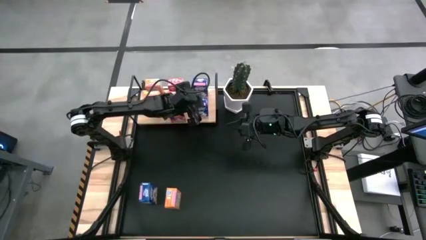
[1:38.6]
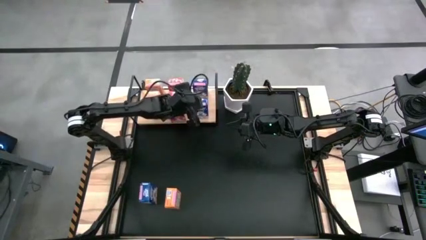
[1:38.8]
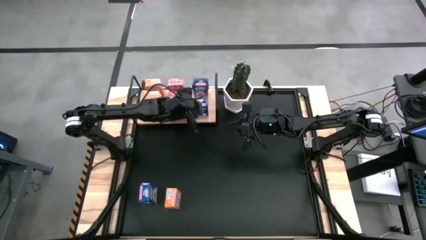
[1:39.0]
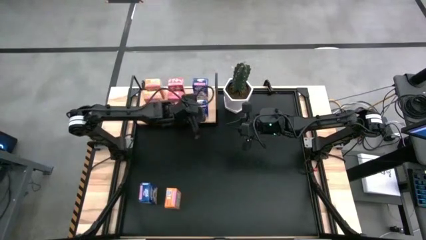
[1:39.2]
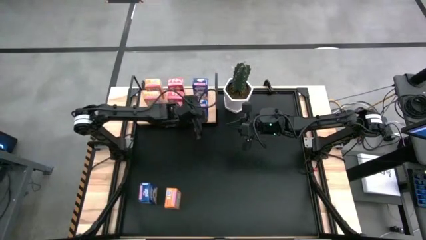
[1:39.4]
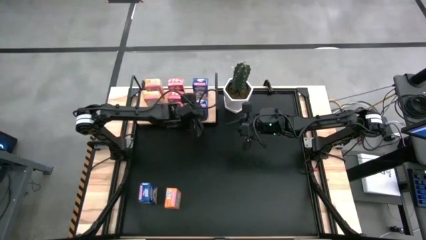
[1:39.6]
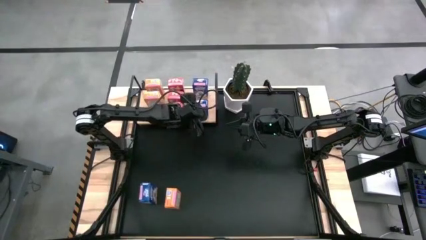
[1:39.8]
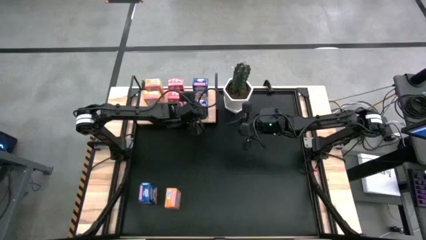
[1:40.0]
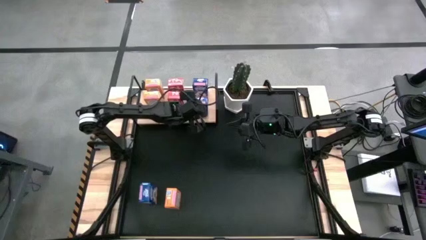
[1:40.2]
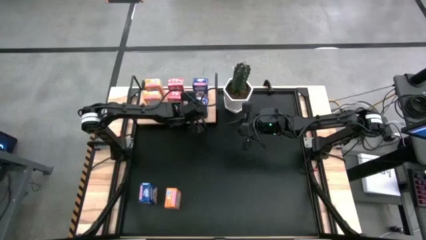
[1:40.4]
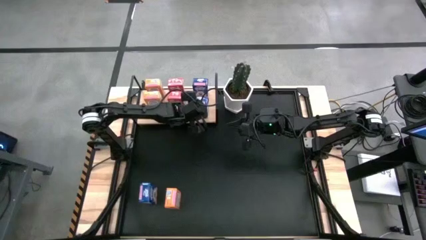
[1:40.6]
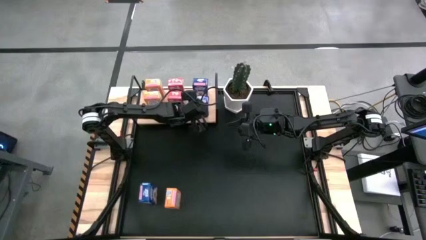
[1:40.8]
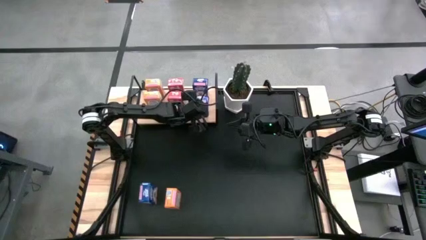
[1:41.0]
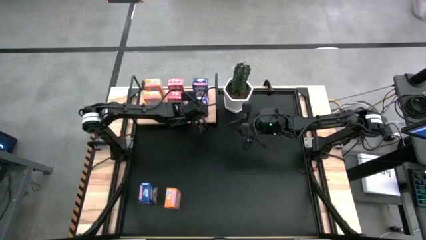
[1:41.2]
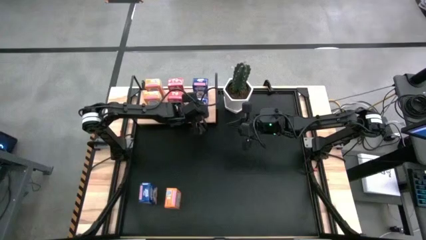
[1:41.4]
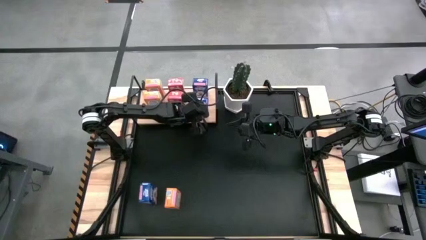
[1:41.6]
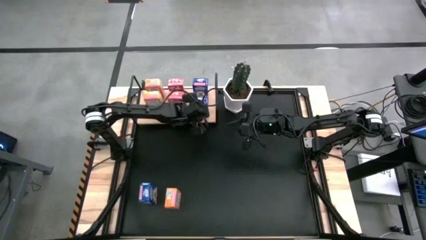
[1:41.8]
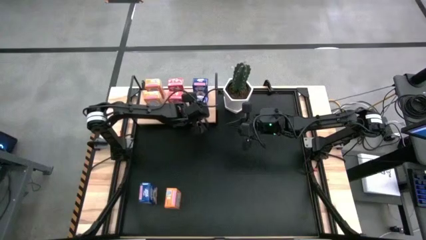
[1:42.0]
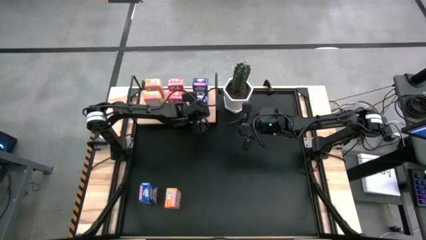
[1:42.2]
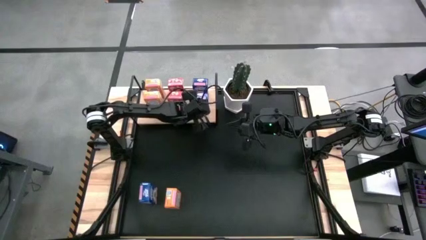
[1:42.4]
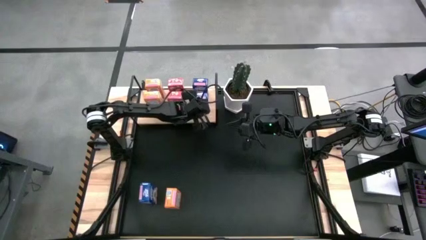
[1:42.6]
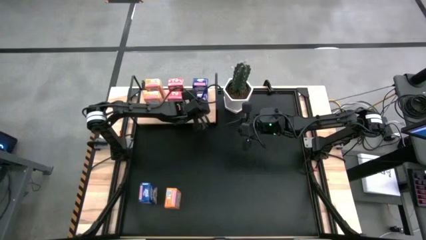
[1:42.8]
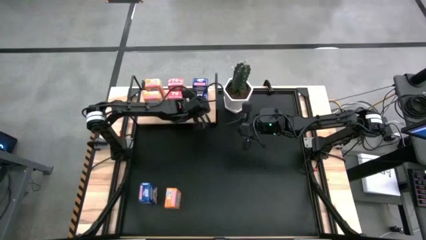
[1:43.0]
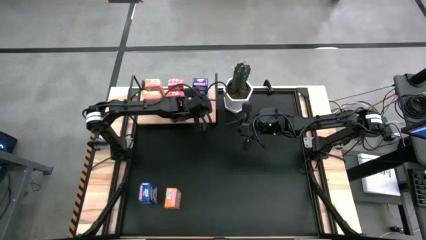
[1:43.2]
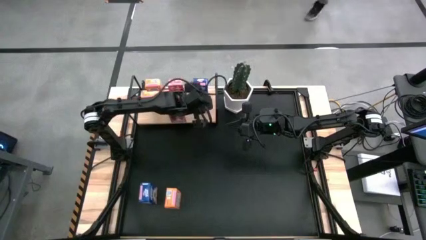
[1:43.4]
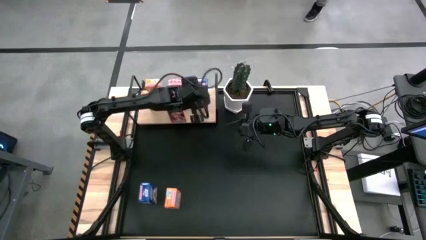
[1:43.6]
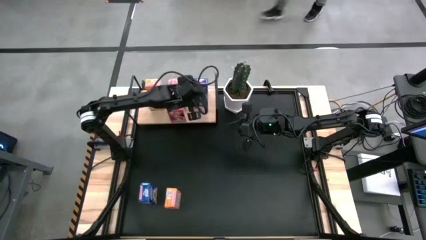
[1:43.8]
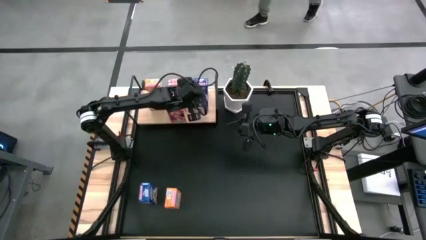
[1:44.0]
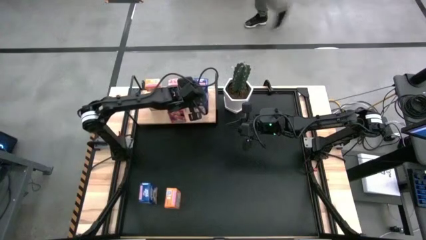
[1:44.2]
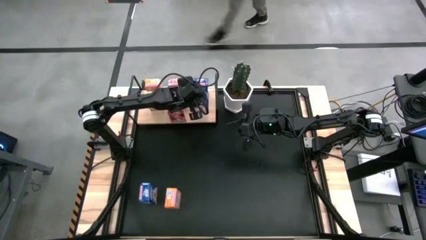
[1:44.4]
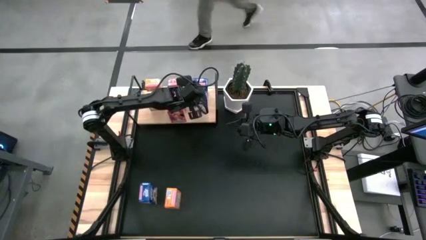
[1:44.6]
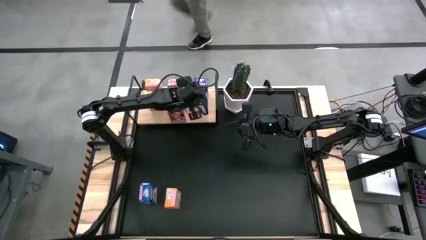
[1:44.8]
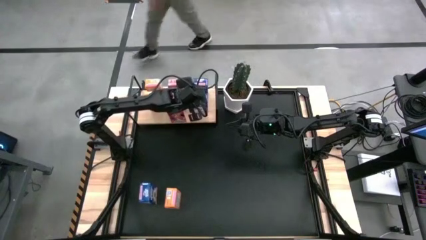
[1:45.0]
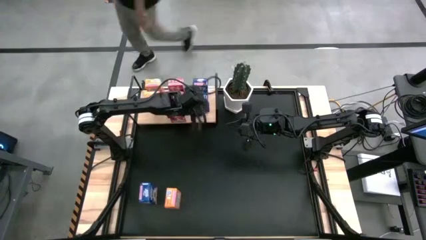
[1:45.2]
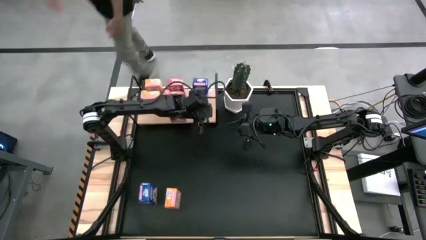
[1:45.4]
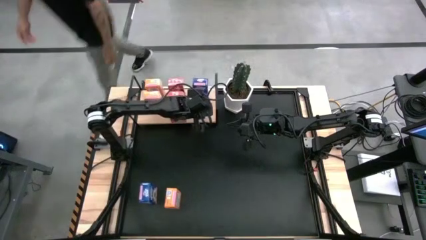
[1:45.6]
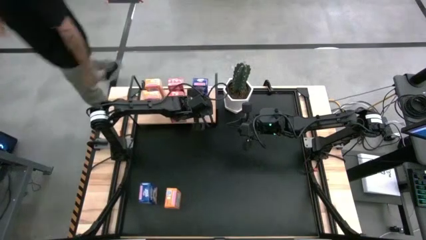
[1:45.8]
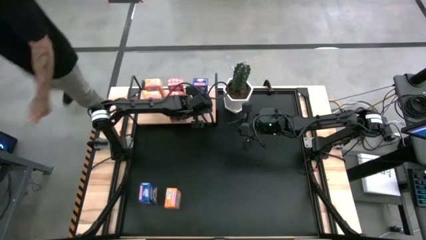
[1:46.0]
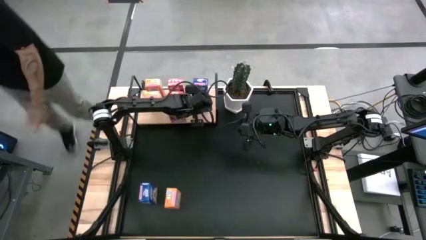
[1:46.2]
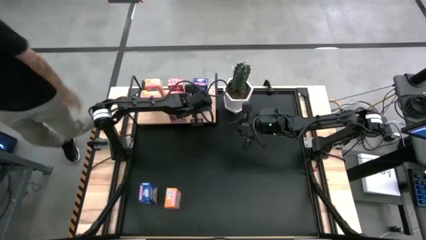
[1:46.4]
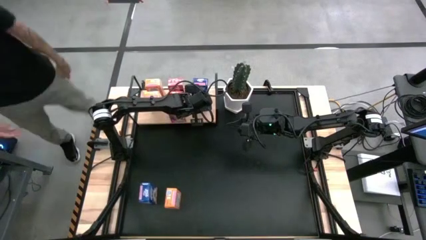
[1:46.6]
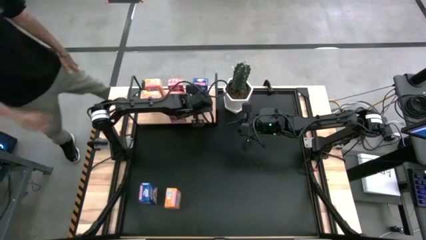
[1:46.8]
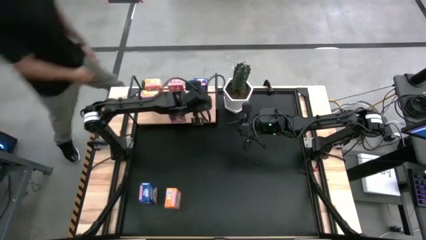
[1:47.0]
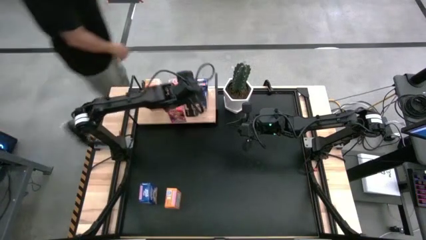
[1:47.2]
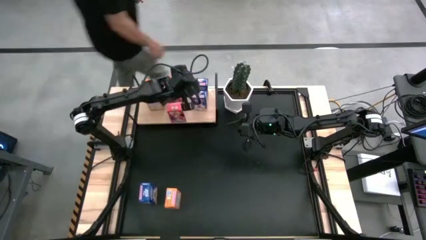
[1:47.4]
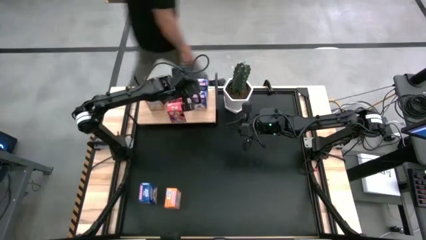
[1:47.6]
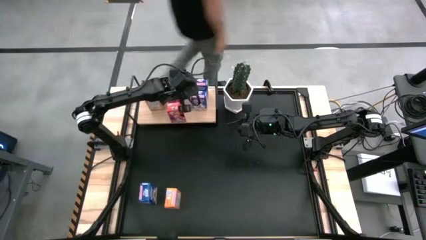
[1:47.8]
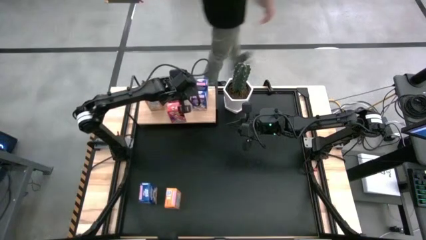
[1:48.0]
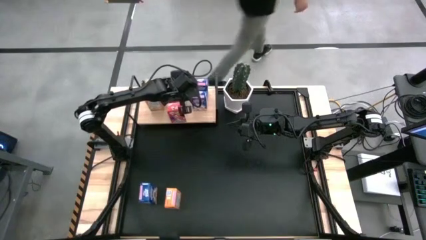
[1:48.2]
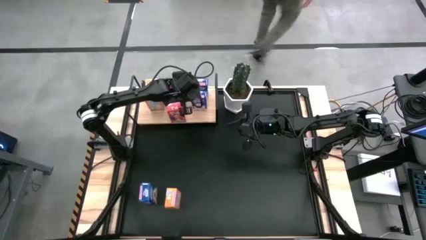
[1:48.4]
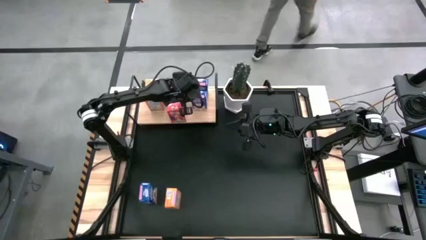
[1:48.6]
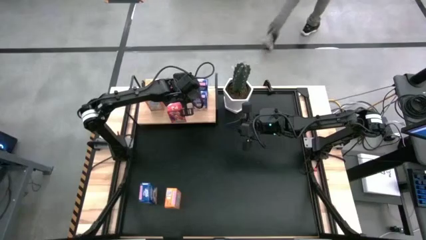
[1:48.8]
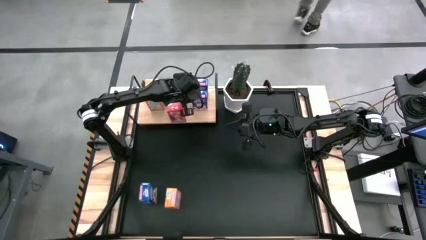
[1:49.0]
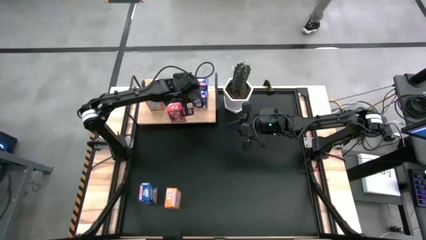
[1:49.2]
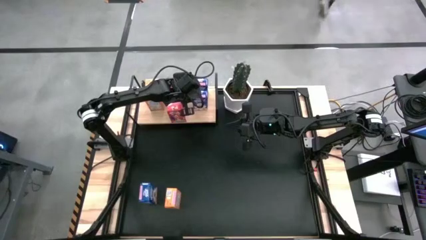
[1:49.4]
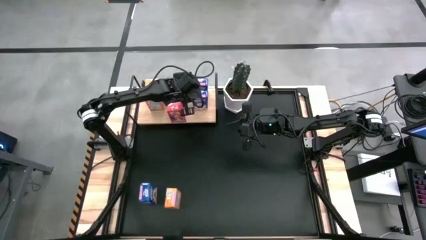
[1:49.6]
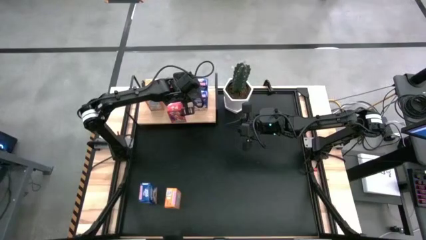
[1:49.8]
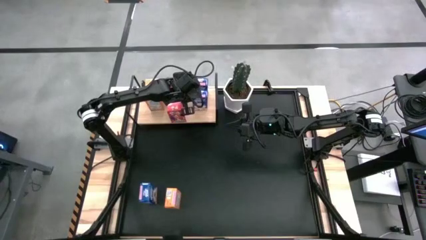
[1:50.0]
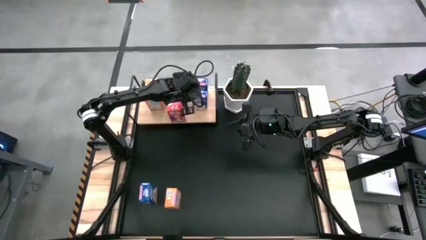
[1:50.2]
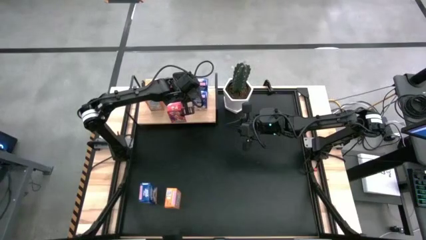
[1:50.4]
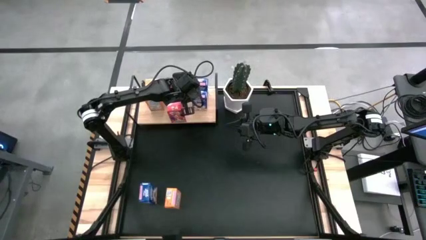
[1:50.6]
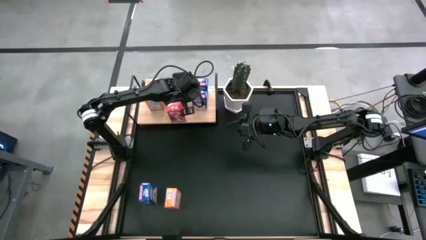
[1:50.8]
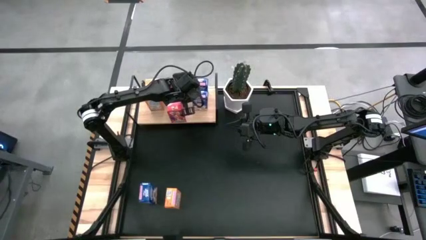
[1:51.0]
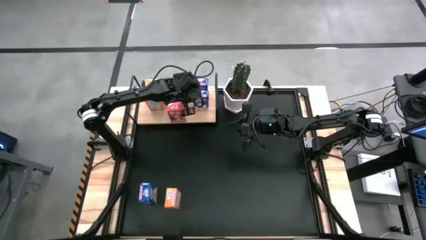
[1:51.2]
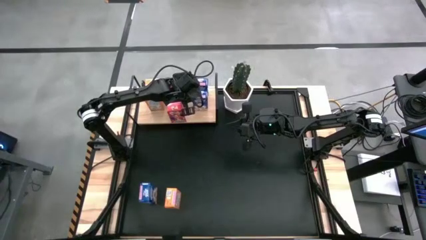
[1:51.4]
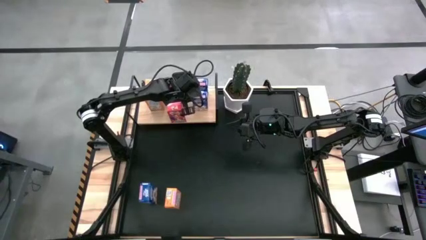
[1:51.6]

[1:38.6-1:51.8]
Task: Stack cereal on shelf
Put the right blue cereal box on the shelf and align it with the other blue cereal box

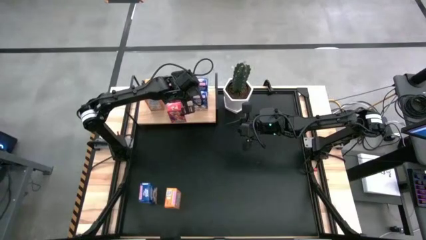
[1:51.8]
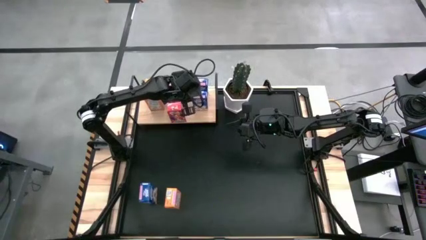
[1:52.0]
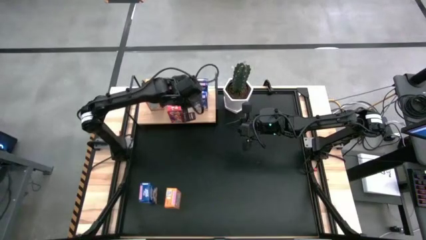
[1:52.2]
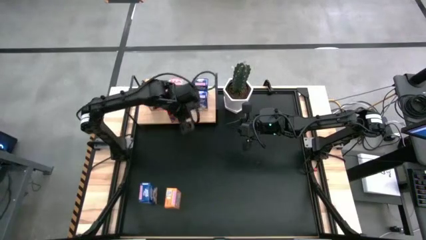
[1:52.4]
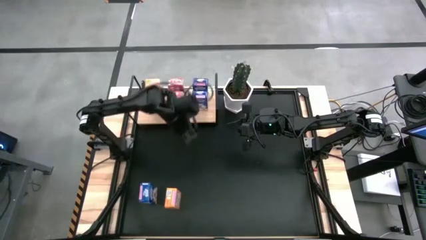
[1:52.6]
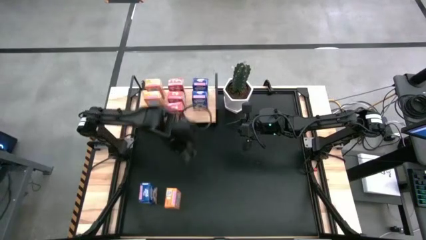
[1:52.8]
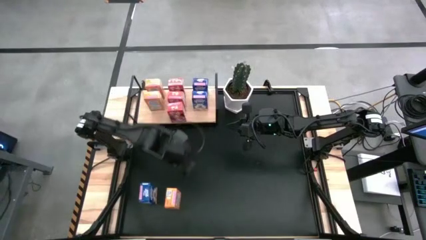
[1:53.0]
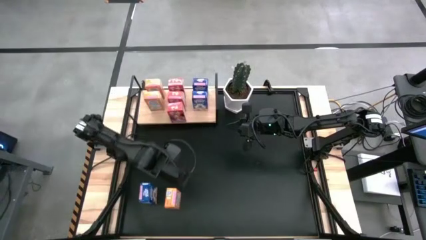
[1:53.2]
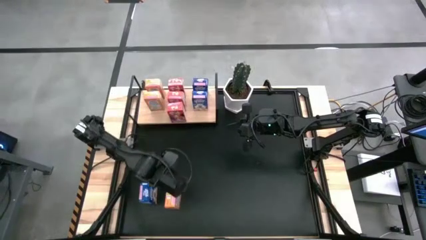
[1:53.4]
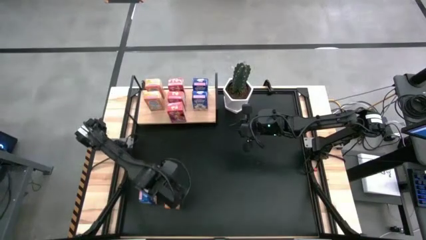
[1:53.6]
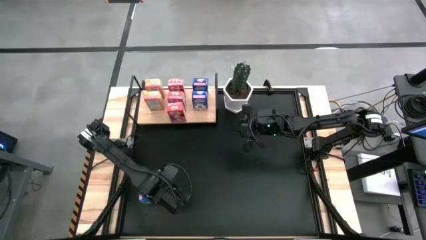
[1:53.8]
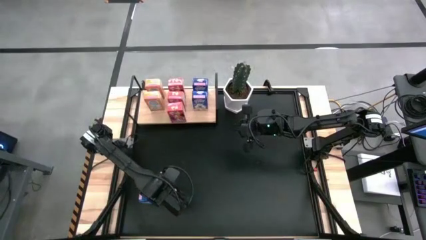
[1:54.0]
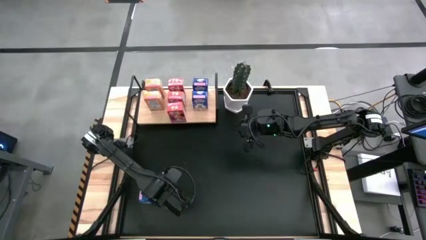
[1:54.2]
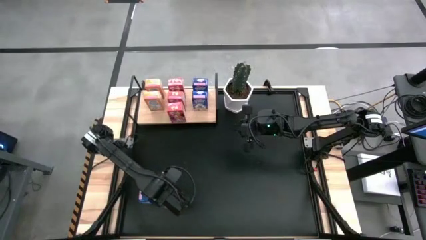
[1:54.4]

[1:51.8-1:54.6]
Put the orange cereal box on the shelf and align it with the other orange cereal boxes
